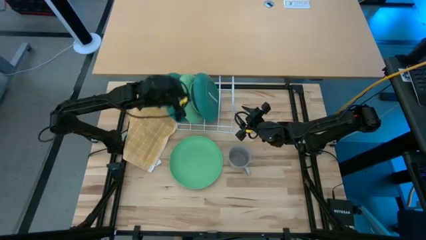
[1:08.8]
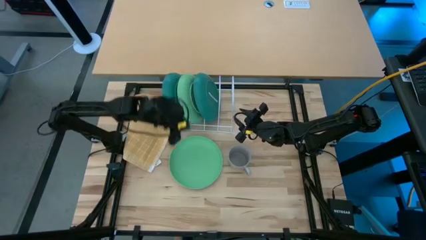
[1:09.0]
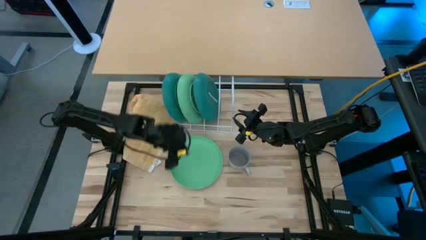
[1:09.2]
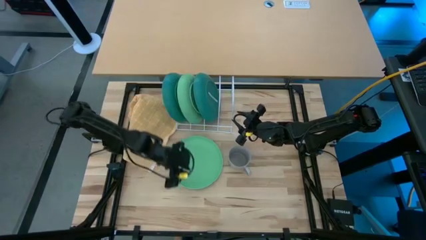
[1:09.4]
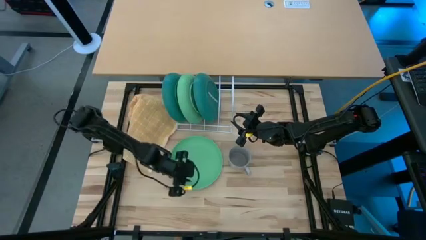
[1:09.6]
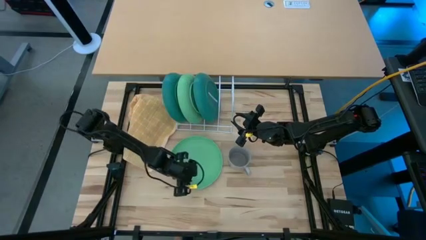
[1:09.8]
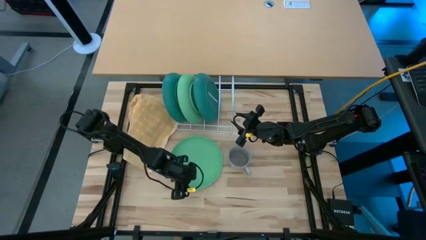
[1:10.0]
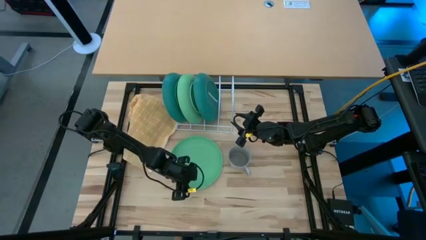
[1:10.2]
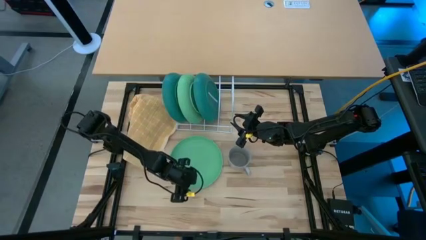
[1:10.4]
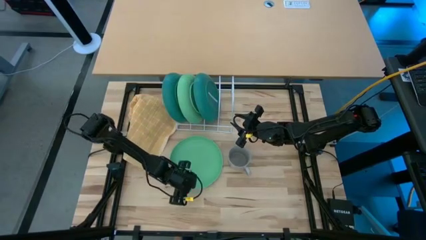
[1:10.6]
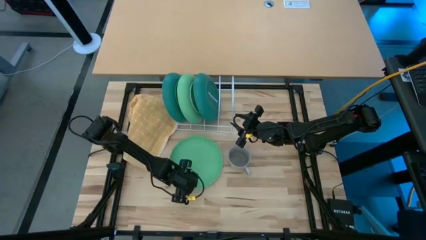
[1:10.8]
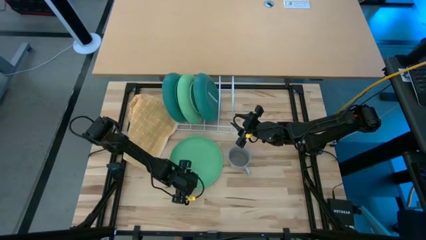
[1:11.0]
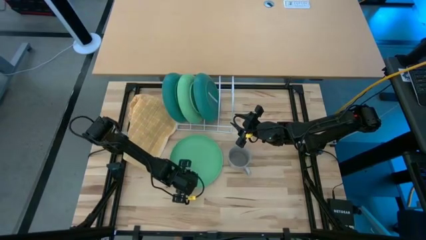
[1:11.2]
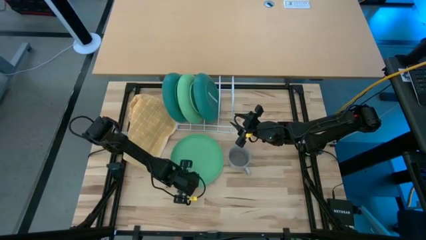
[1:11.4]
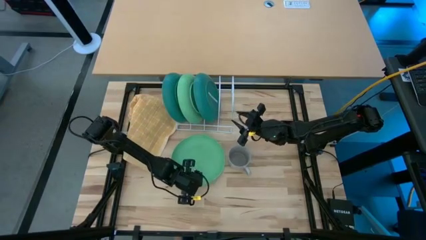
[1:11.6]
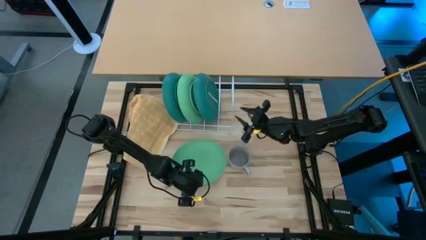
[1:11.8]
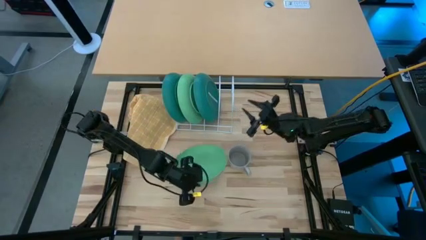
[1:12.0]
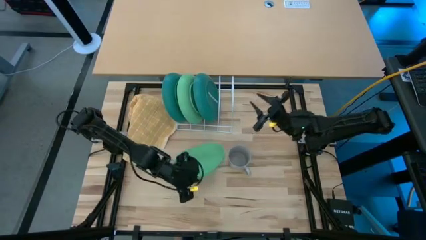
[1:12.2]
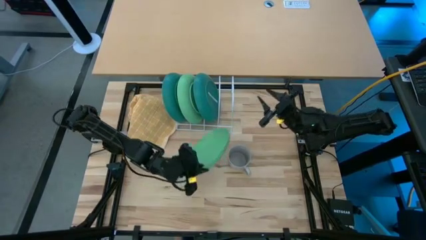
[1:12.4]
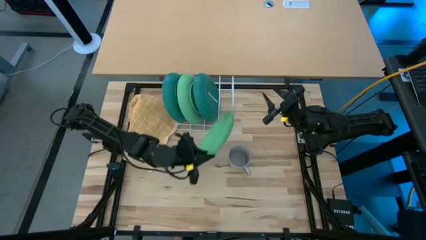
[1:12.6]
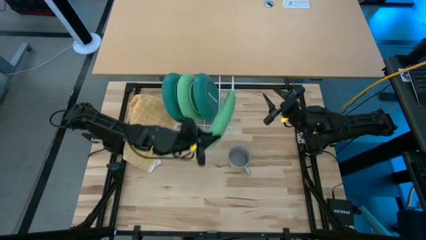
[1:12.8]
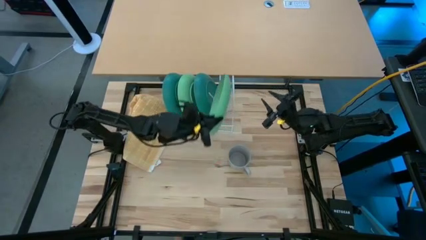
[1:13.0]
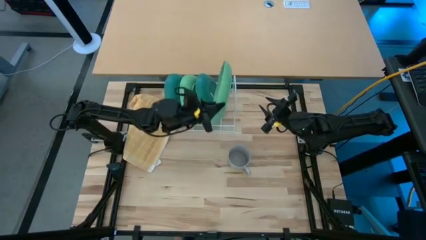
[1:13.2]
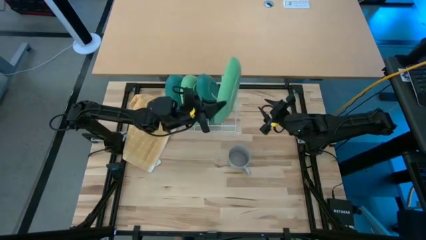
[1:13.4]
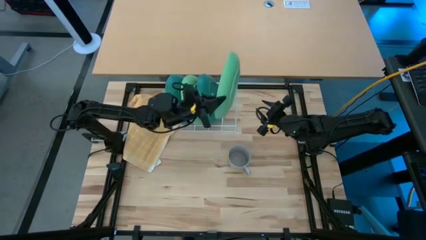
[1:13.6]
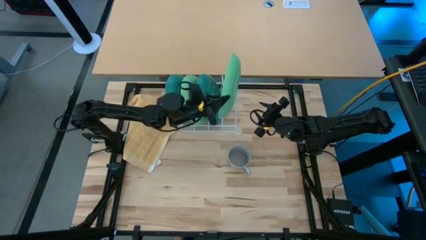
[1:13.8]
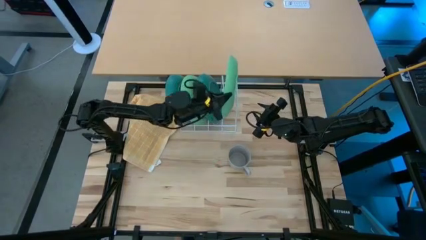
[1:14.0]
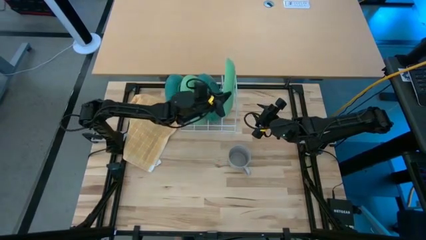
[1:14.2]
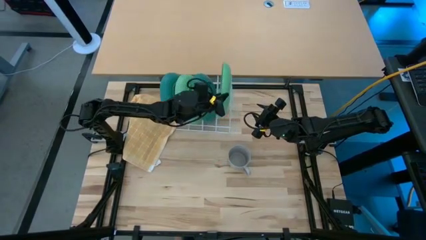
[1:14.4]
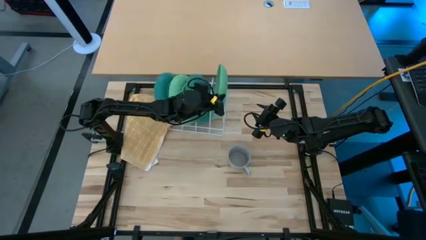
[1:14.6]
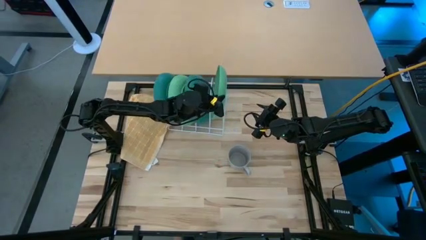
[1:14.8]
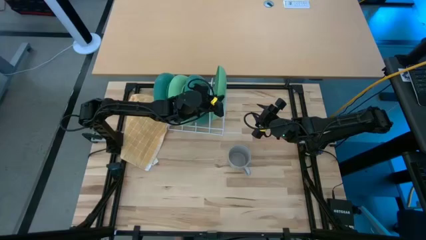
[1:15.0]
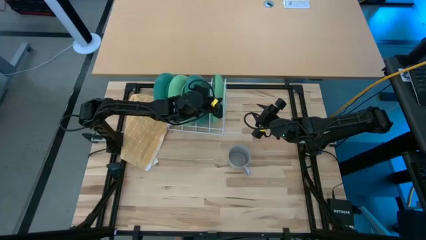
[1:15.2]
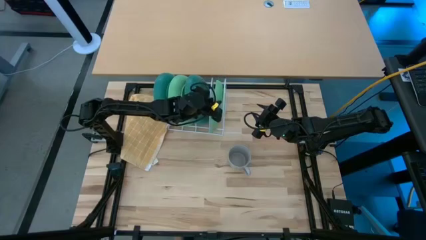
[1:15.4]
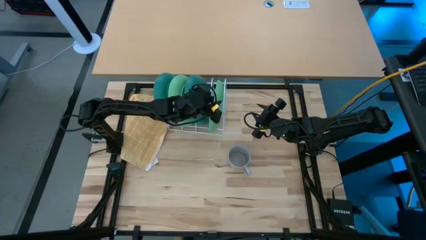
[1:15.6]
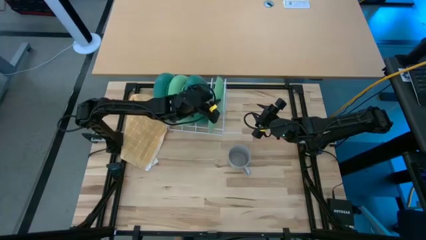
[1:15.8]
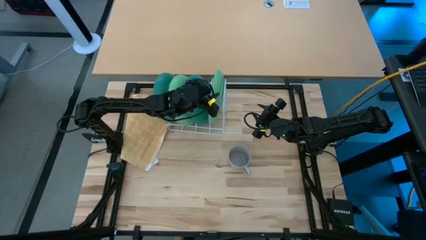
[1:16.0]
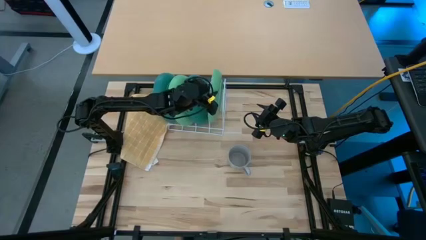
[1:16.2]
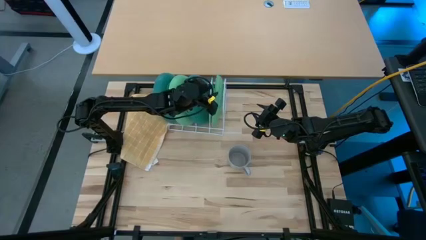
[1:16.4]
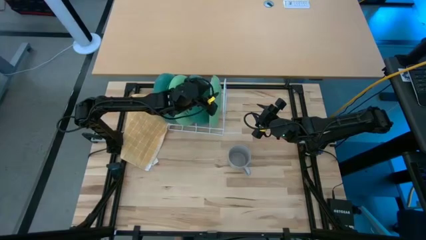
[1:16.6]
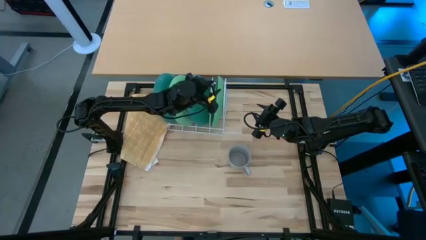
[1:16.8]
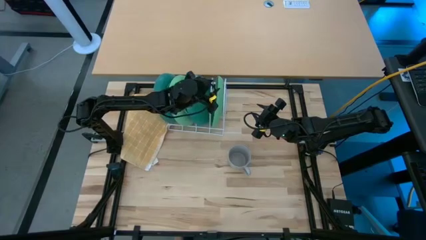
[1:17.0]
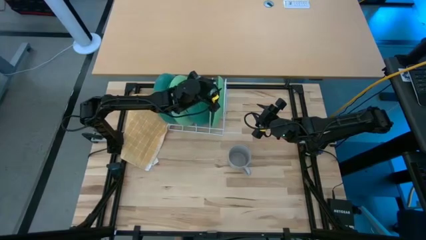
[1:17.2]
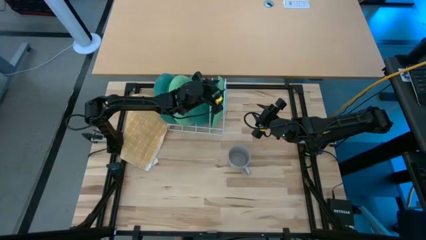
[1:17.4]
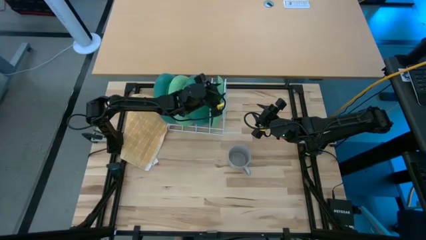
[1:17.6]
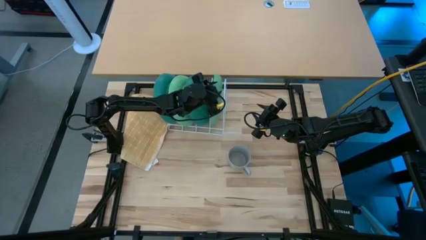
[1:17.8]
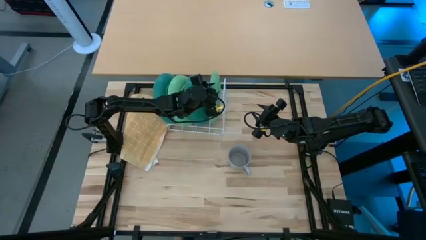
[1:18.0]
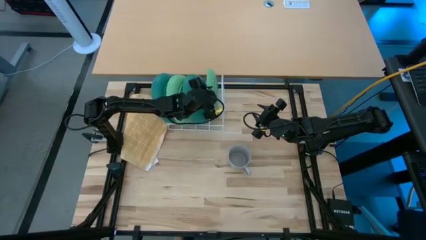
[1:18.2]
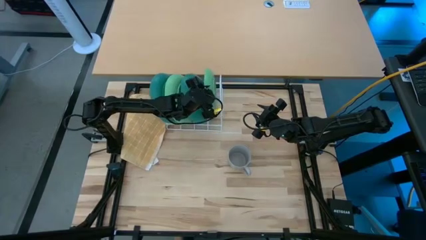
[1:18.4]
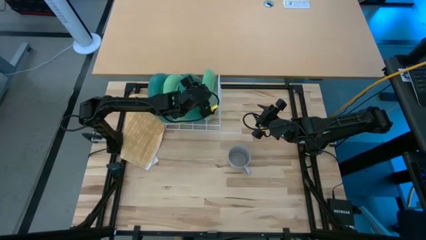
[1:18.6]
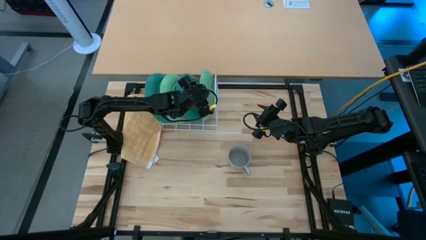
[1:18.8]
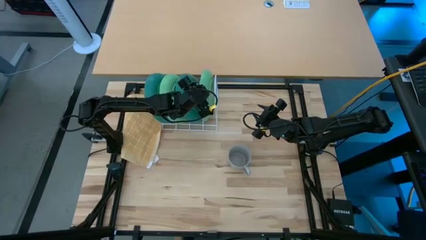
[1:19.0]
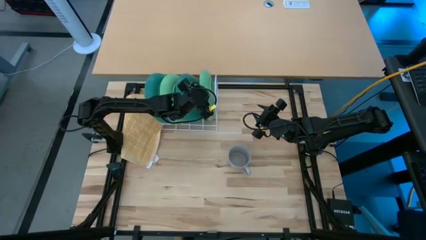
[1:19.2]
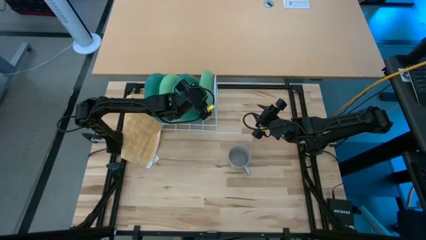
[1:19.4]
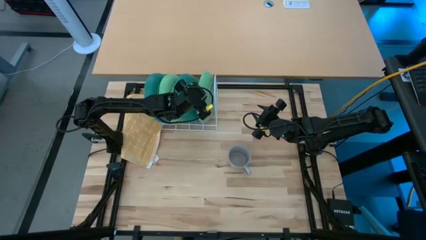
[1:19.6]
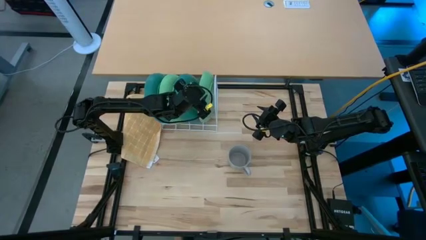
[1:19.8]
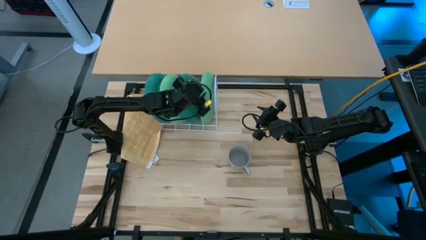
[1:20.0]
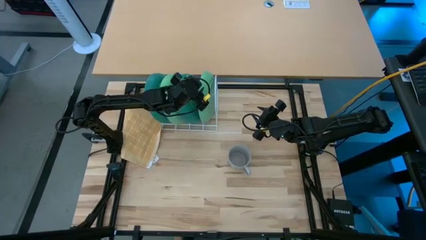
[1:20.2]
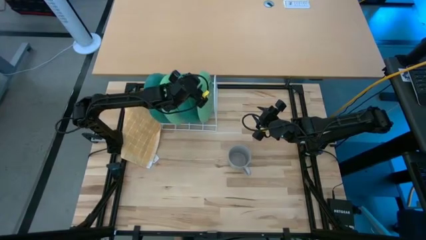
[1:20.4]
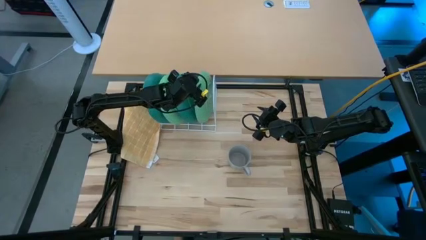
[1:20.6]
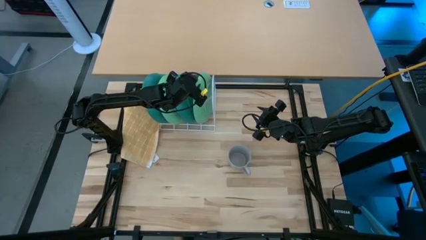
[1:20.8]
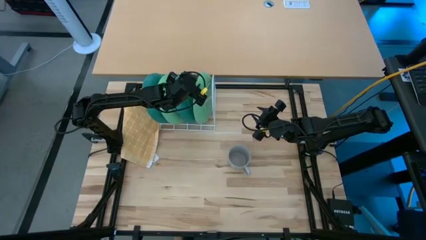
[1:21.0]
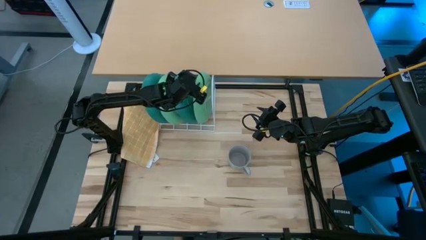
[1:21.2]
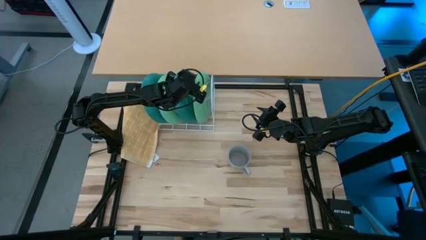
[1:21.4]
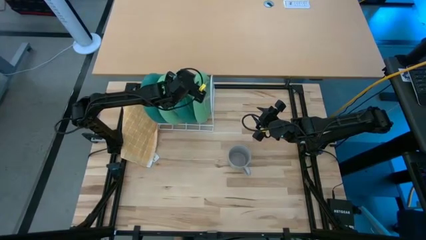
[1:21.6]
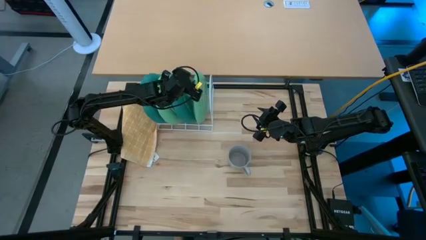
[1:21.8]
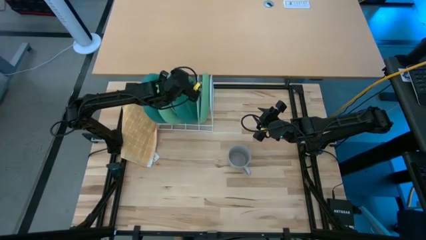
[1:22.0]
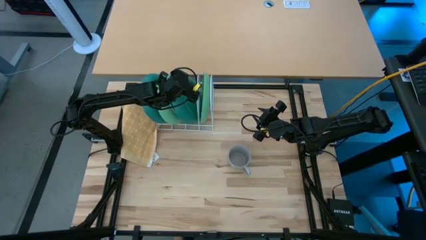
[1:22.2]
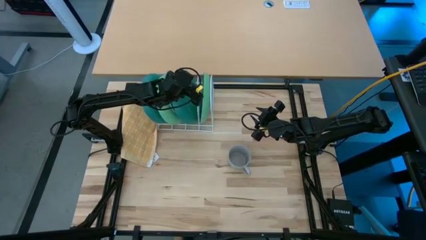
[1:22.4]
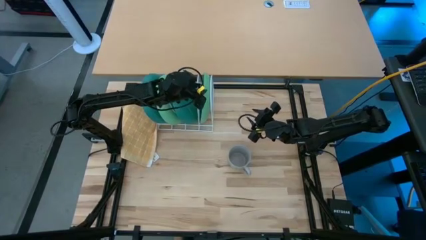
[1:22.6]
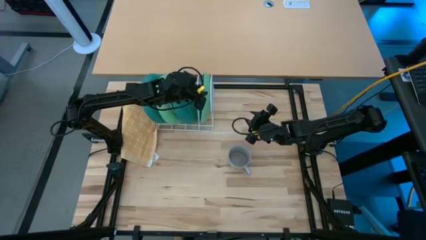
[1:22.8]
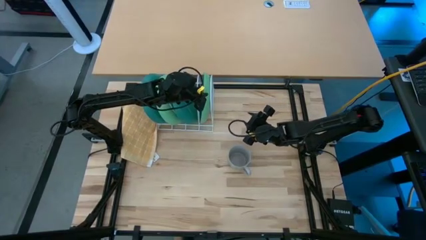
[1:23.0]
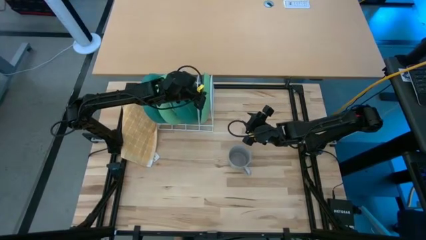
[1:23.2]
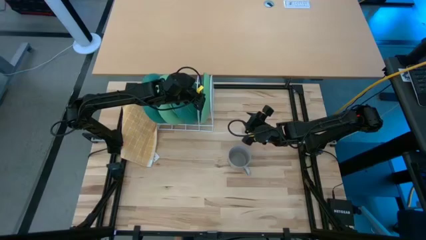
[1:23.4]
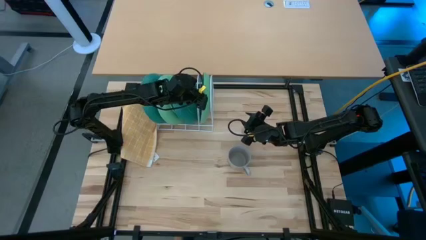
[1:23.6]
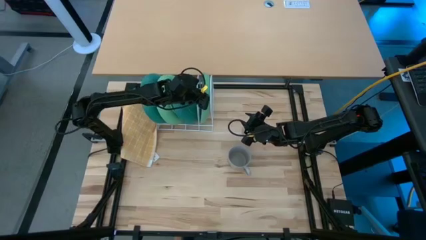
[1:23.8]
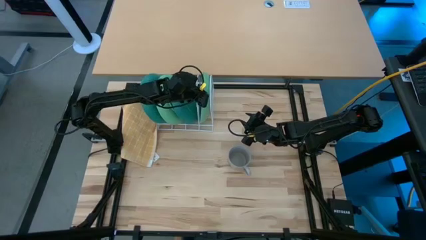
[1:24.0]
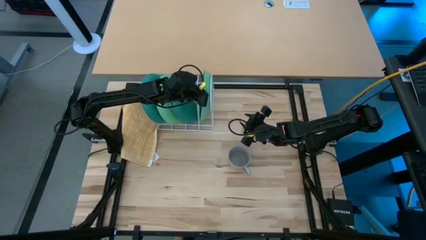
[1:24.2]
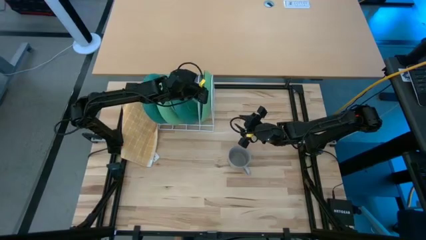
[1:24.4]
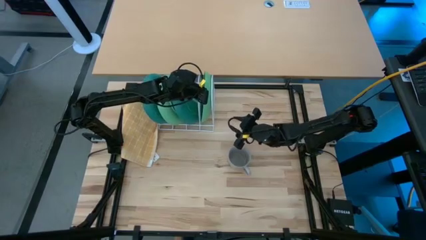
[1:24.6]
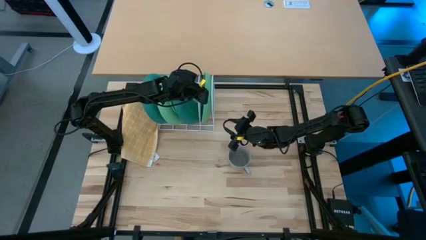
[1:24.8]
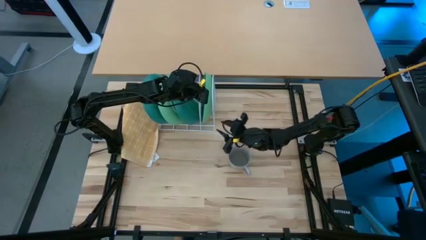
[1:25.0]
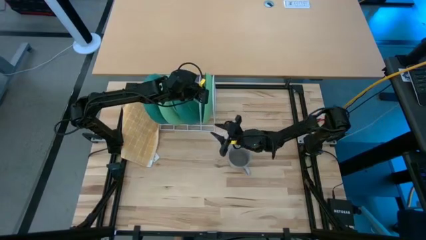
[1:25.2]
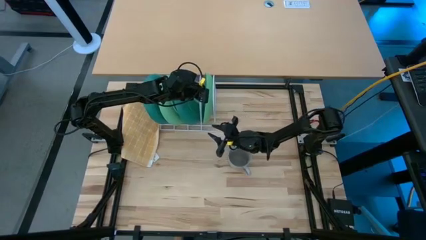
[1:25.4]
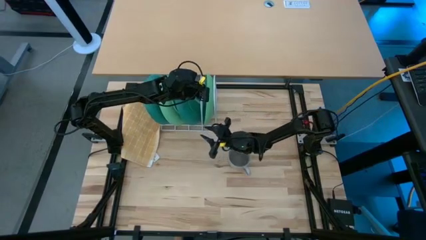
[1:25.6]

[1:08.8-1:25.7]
Task: Sort dishes
Put the green plate into the dish rack
